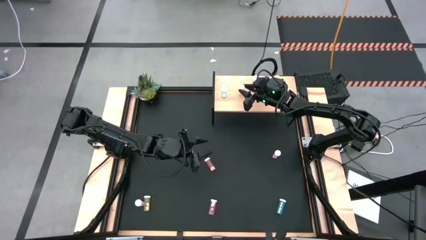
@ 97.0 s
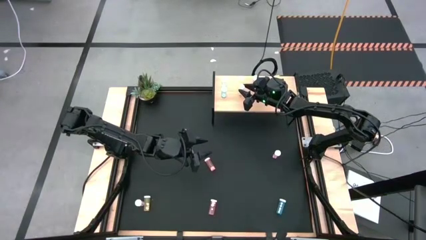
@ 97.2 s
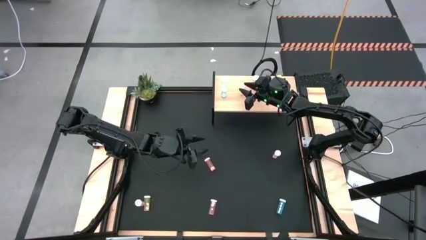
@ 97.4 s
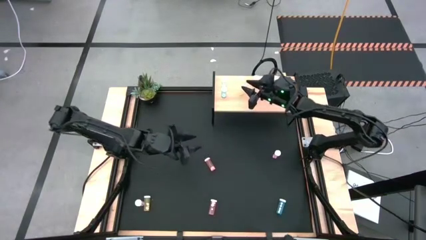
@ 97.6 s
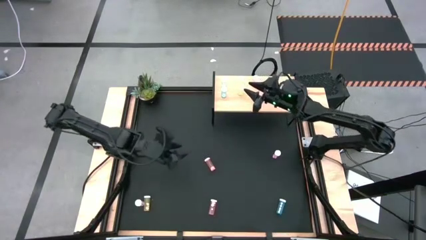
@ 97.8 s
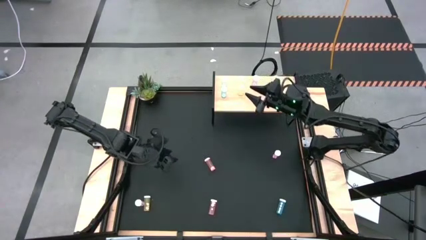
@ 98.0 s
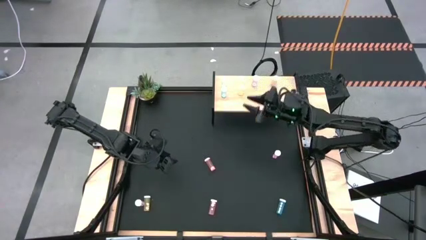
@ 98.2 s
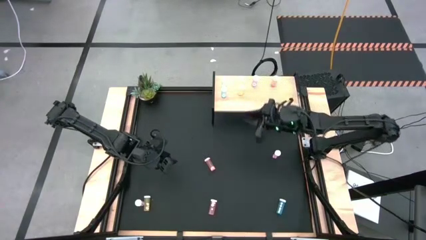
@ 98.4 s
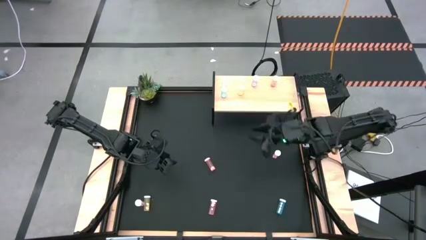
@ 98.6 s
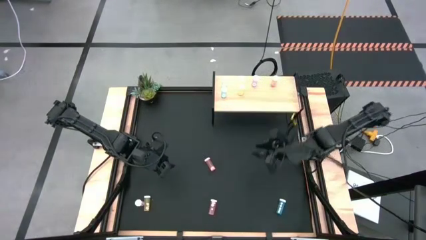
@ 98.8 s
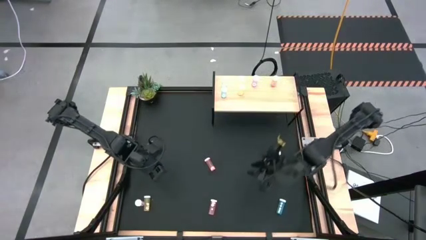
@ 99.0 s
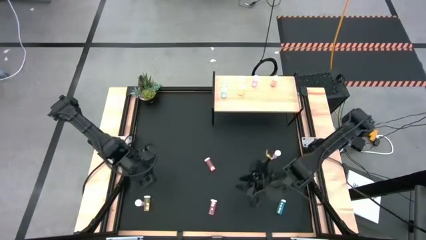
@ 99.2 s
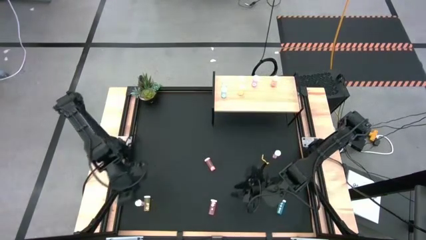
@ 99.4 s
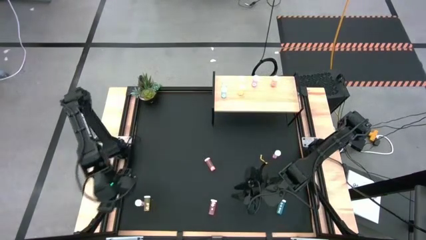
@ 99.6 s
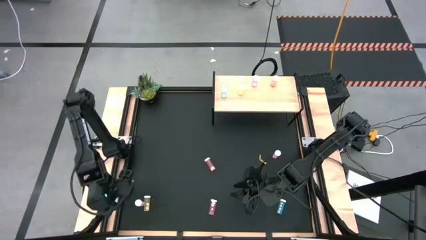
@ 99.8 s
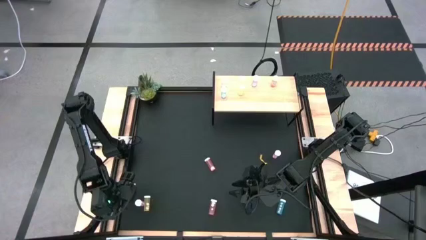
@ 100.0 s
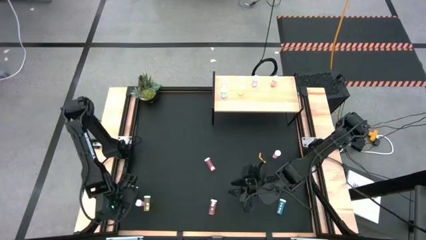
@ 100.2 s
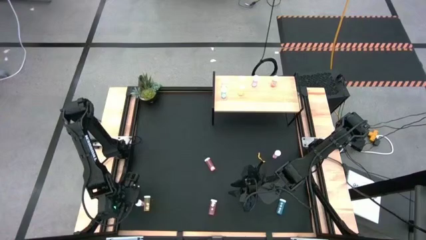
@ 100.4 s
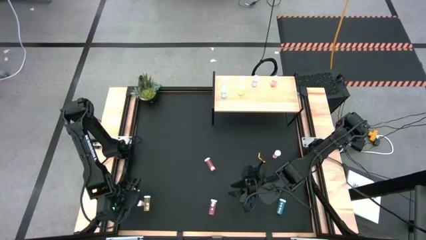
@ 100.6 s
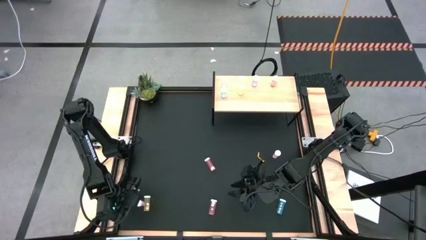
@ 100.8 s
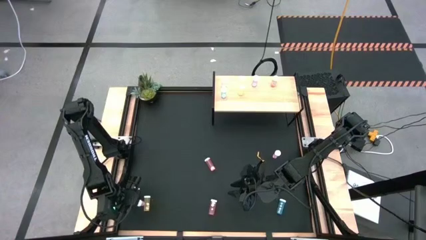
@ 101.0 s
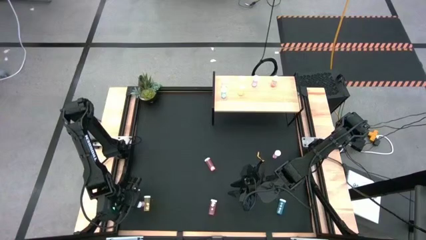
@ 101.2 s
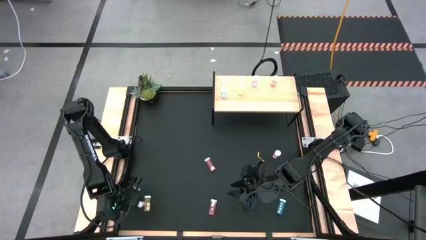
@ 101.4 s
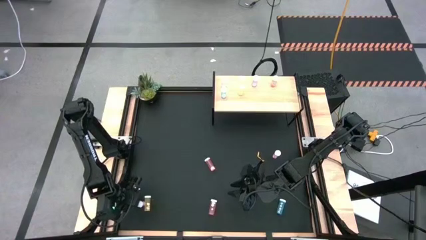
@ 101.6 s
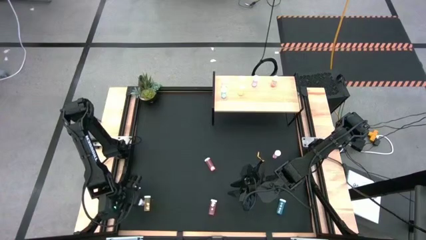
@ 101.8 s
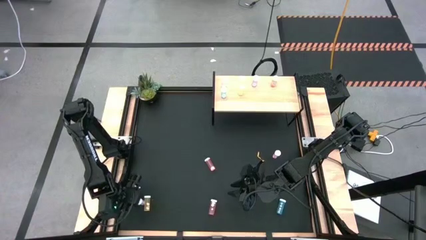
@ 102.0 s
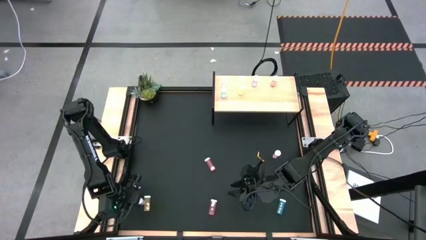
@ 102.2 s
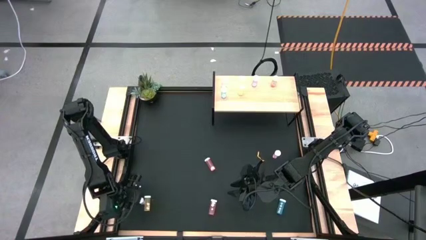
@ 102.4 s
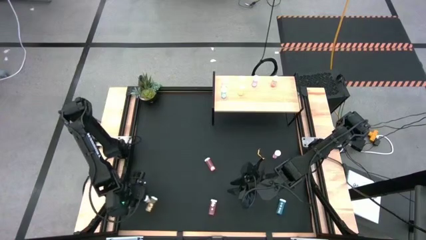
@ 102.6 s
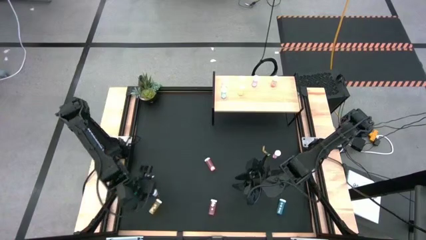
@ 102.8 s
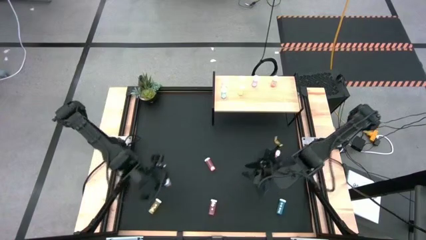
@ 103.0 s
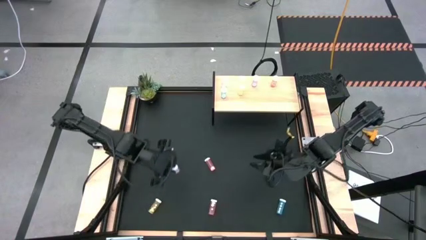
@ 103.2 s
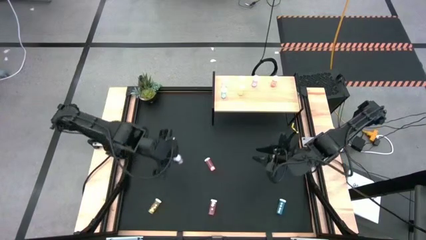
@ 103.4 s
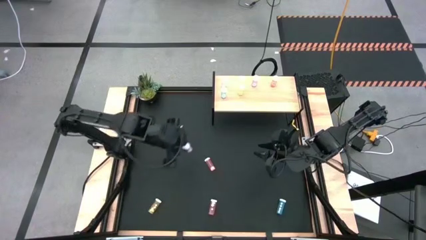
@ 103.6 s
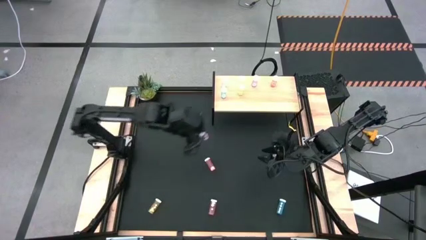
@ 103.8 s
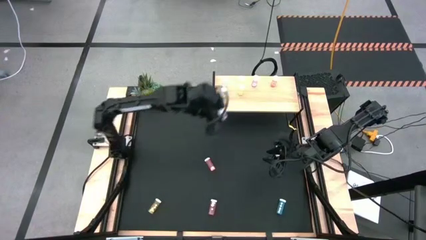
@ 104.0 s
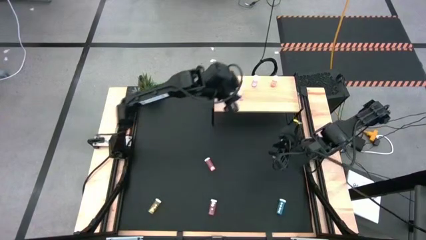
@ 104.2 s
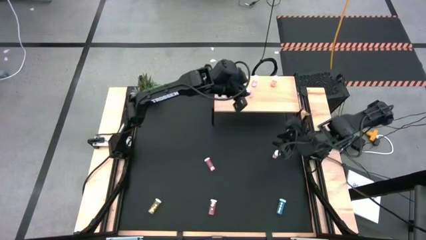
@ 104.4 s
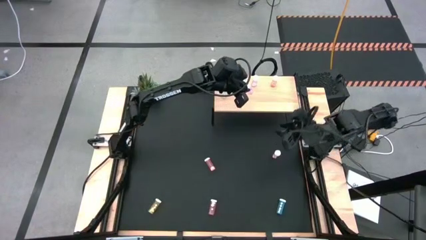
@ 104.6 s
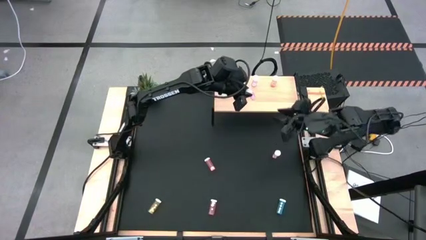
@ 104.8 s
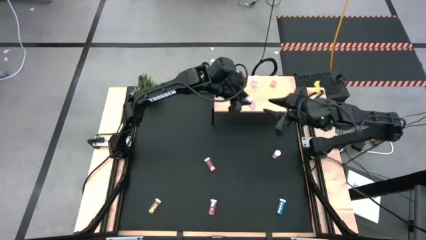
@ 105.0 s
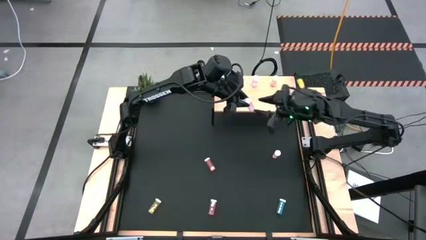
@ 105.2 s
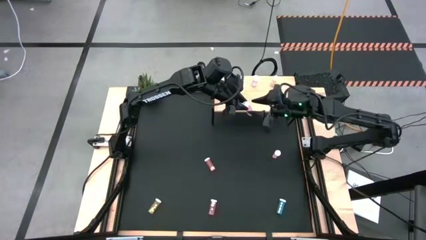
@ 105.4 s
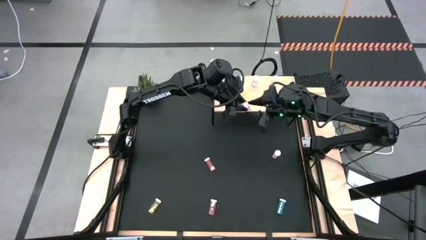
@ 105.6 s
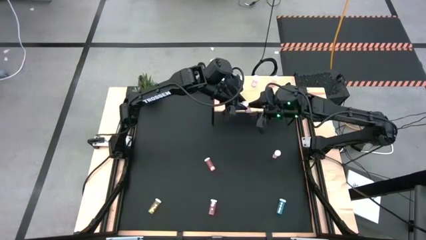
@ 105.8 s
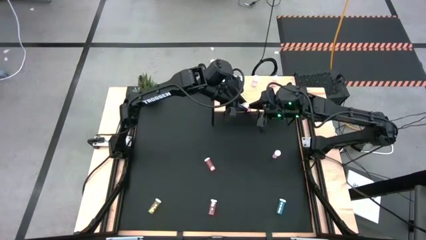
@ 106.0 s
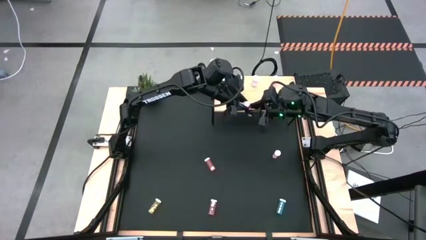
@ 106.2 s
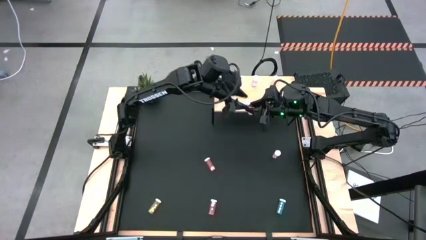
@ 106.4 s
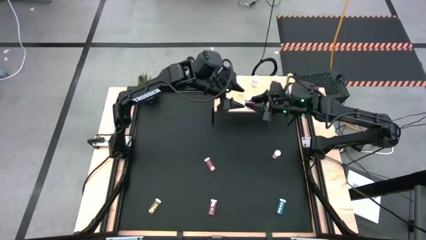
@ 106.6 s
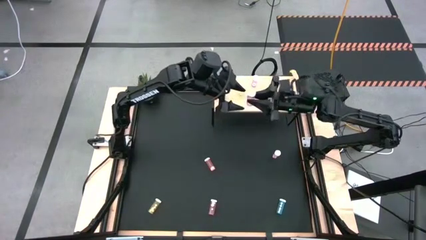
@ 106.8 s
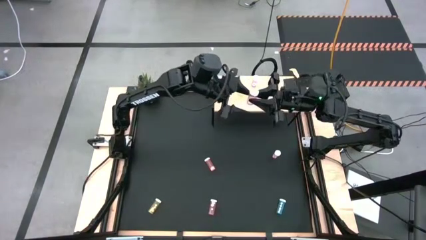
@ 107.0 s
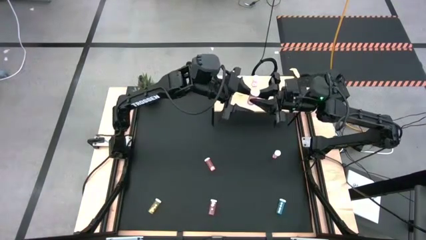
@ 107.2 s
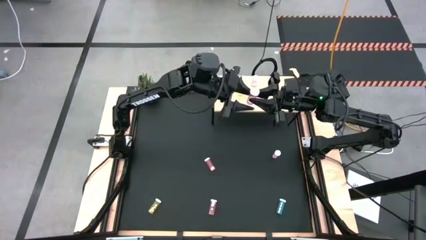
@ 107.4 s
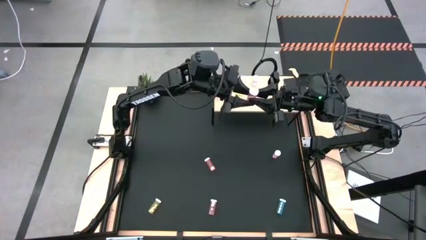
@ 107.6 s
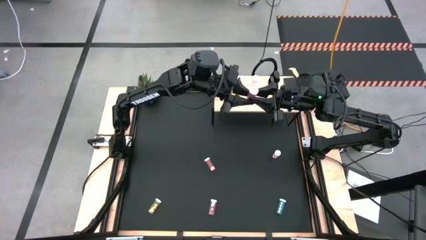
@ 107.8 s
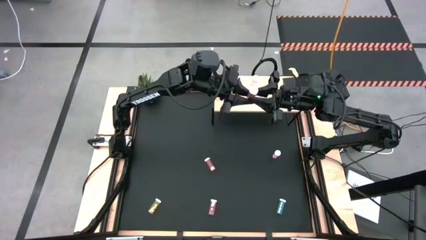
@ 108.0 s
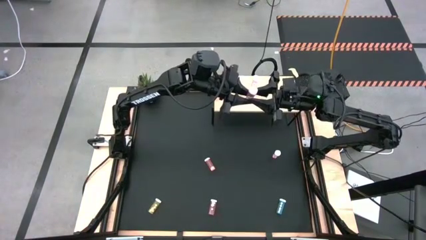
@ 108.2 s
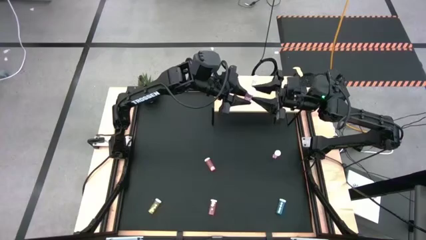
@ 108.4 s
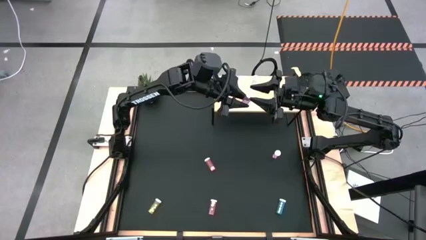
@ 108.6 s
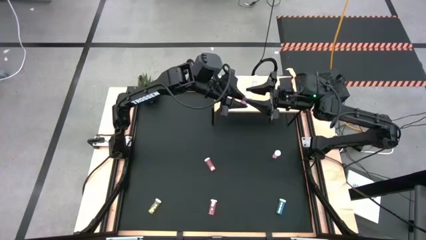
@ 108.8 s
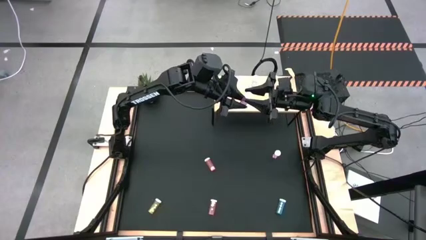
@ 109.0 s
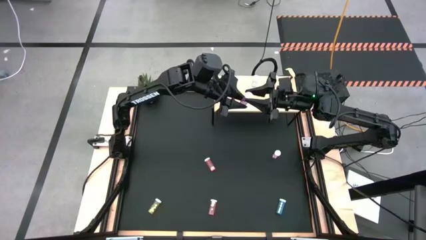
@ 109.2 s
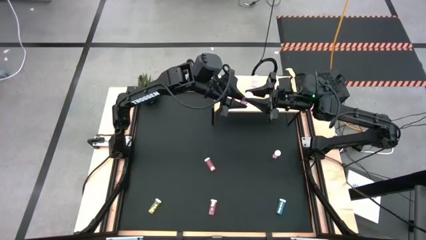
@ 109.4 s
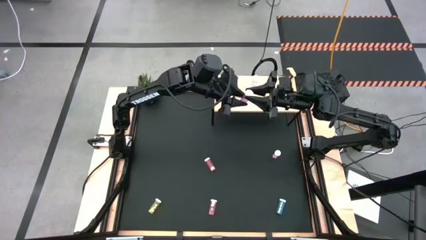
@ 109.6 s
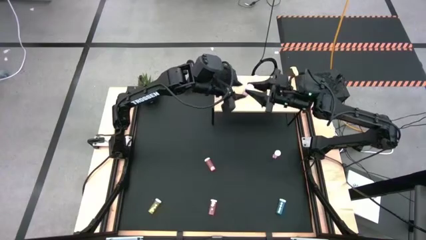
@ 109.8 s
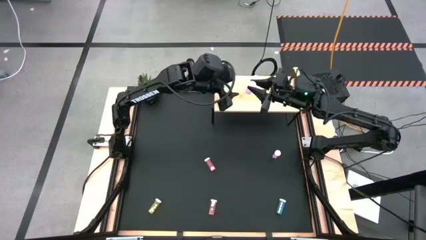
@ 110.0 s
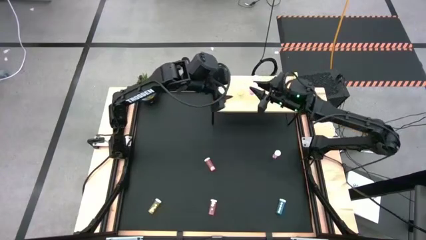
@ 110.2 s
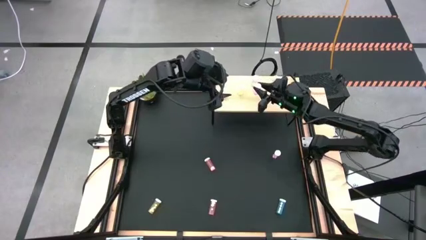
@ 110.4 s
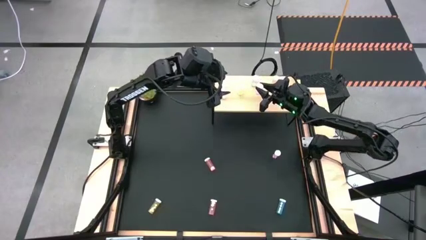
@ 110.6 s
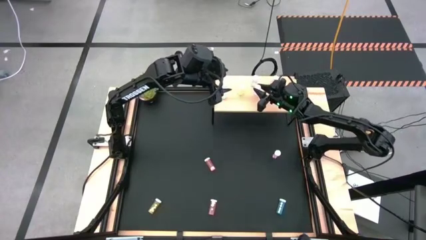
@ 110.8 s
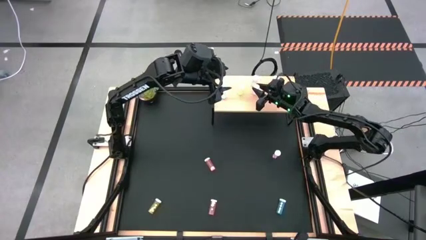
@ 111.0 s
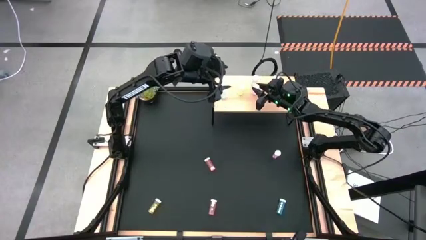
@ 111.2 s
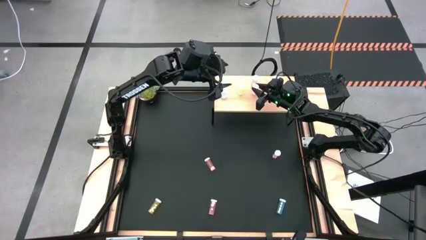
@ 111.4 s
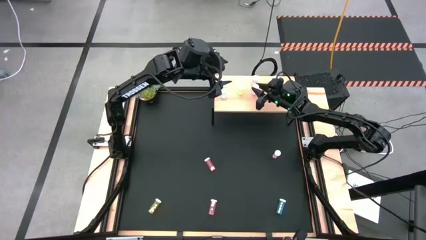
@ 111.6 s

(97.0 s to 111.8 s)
Task: Pick and place medicine bottles onto shelf by color
Put the left pink pill bottle on the shelf aligned with the other pink pill bottle
